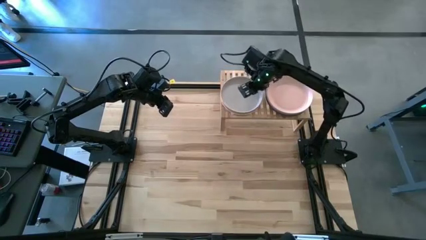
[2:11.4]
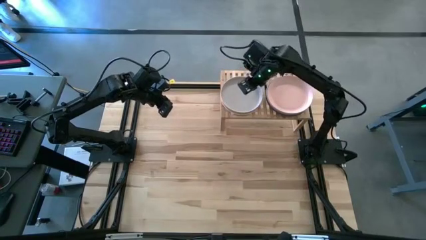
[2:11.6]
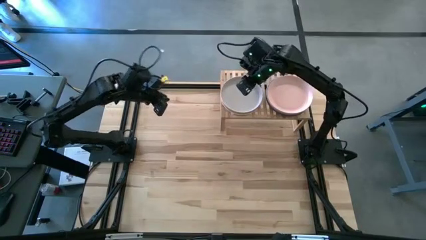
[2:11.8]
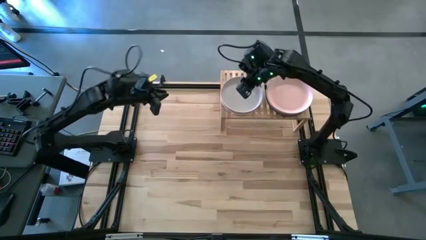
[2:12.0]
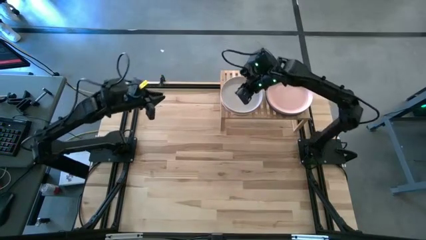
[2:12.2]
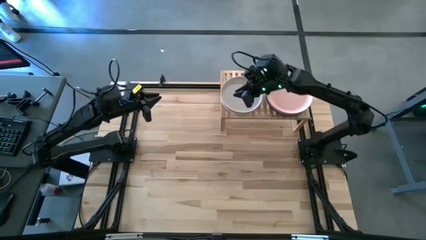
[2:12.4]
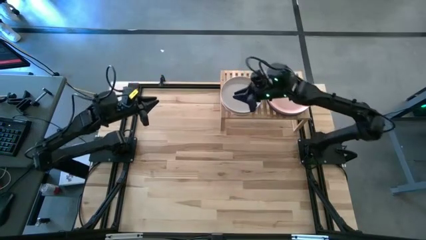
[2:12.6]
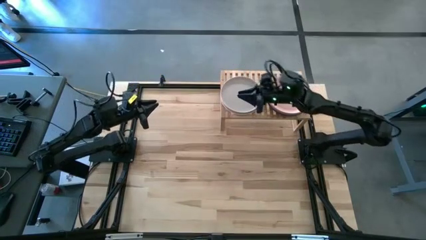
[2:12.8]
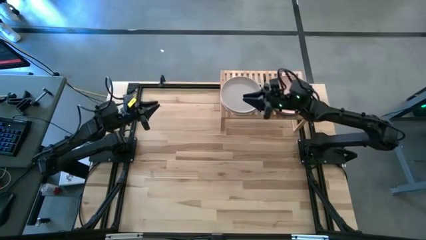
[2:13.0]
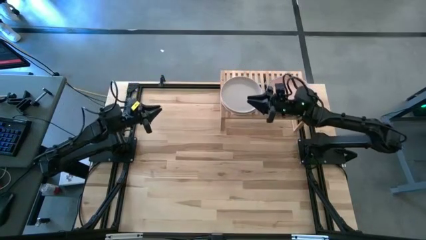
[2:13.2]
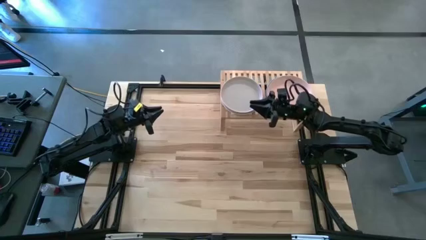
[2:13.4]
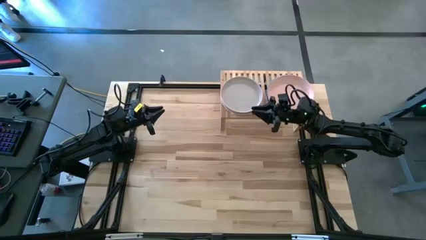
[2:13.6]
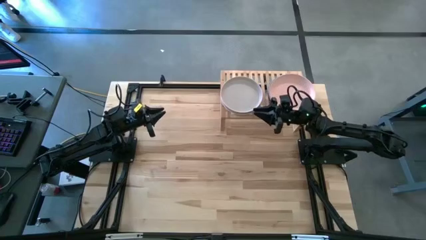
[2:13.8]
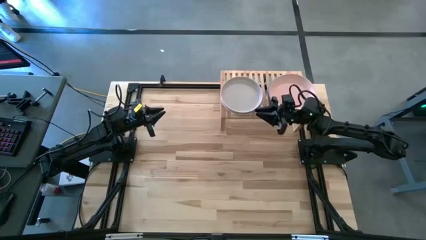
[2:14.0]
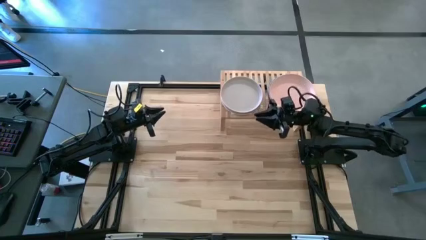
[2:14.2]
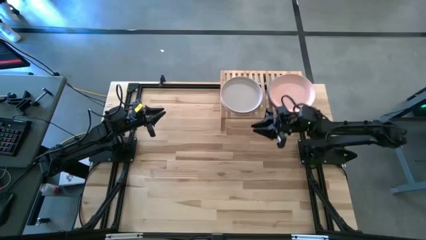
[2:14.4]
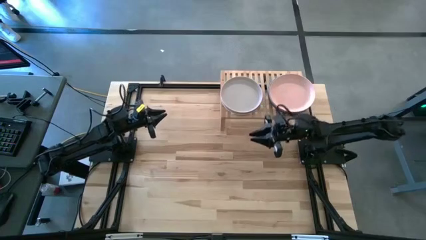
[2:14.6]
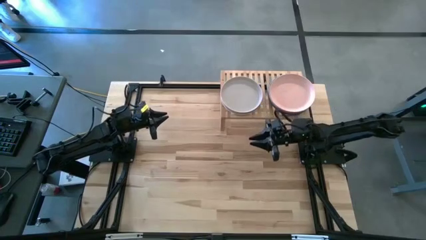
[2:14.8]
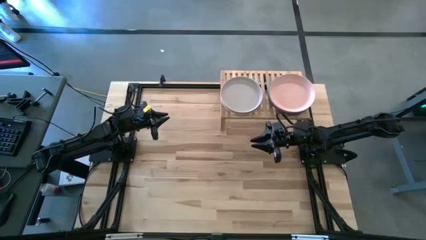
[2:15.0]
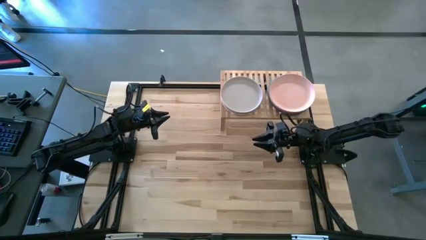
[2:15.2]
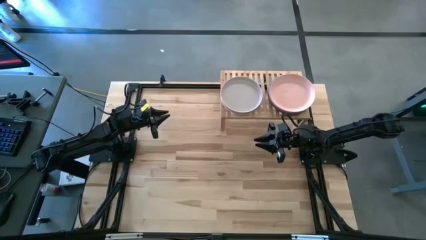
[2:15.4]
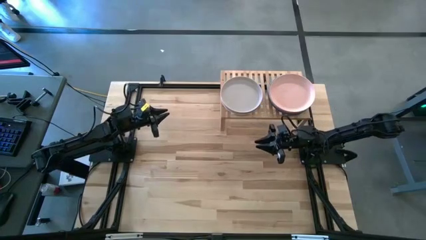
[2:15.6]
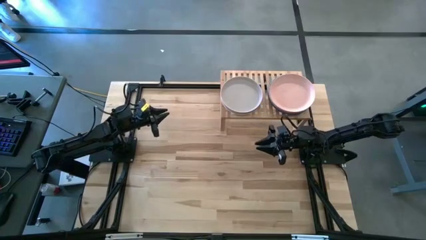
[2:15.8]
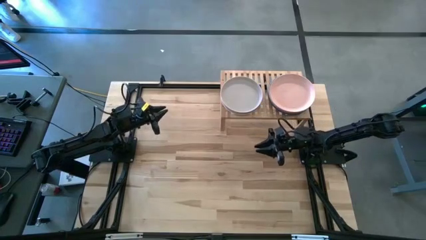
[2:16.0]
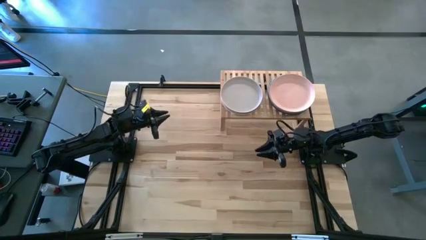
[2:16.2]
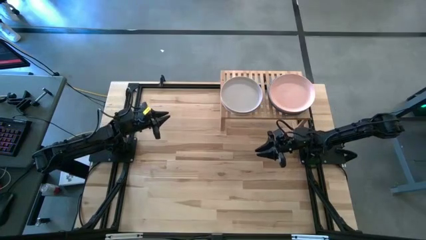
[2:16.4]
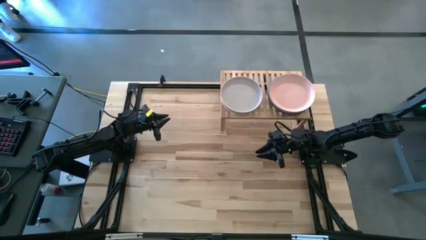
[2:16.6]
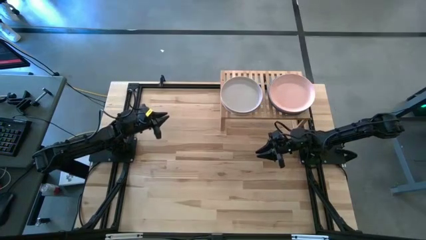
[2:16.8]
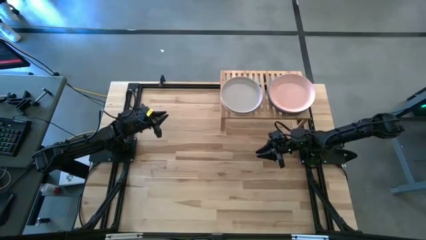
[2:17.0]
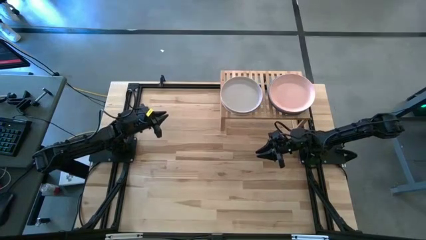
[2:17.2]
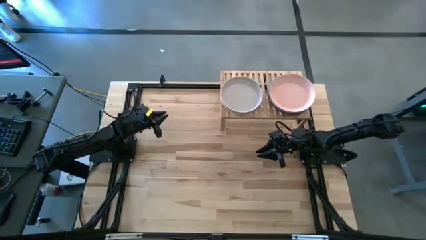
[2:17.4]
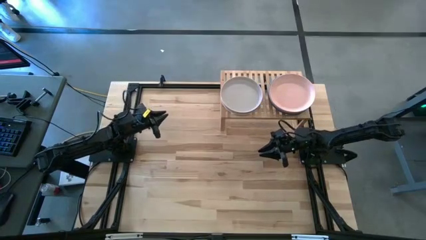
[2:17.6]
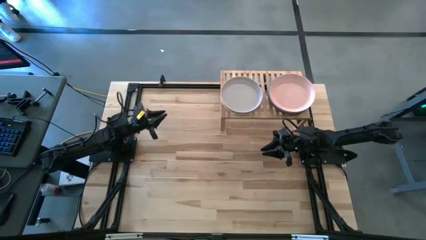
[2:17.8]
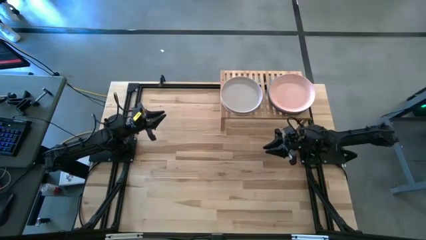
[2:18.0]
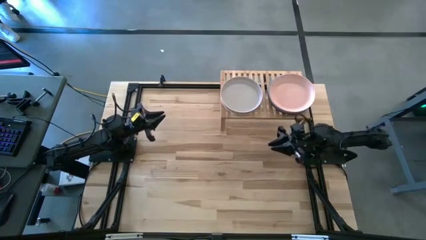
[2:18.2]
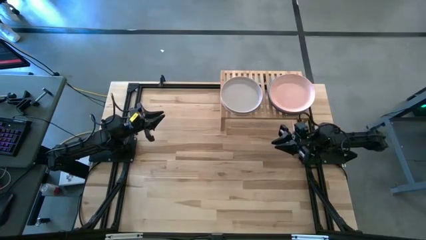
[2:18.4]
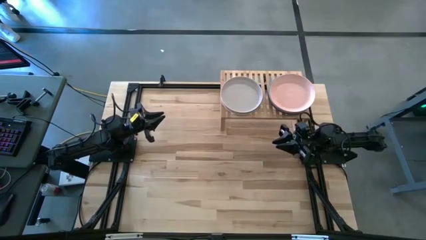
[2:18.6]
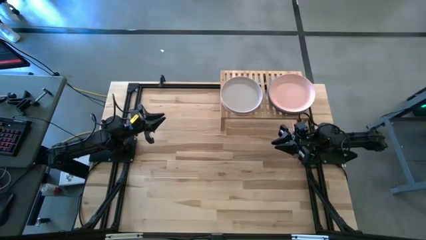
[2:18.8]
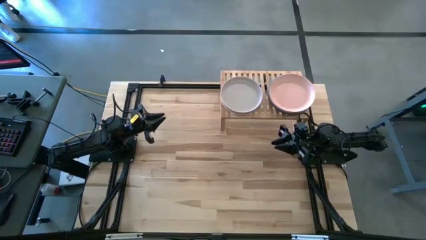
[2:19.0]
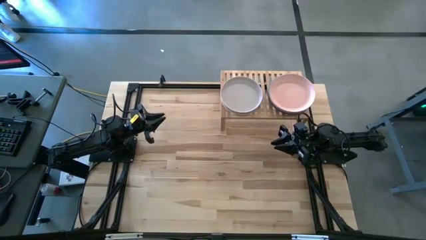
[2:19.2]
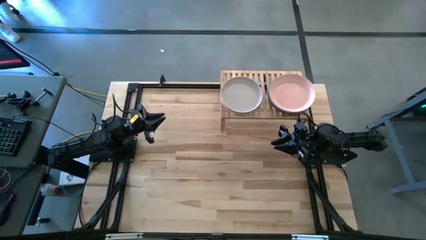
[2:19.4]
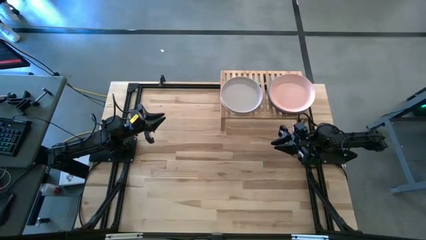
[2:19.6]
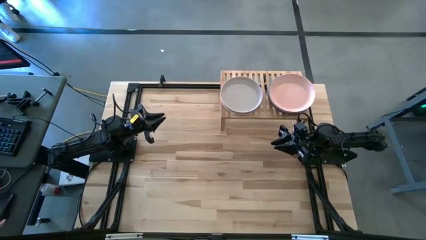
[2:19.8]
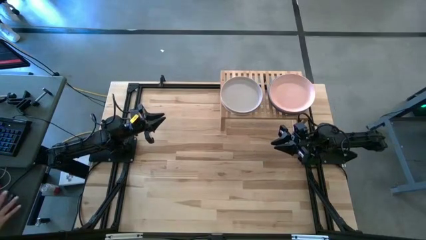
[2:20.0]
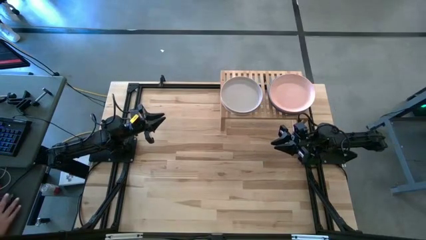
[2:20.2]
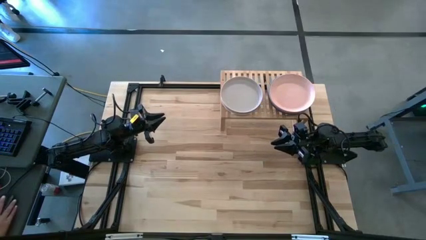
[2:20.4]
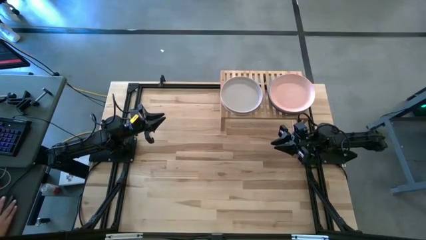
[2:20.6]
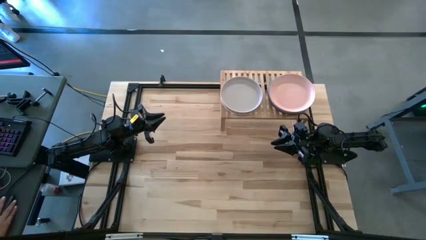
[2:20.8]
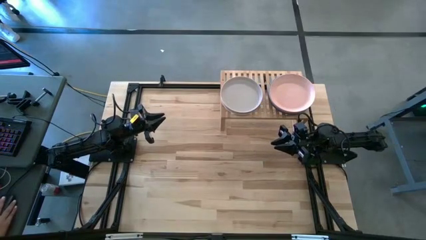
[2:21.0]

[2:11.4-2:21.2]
Task: Place and stack plates onto a shelf
Return to Home Position
